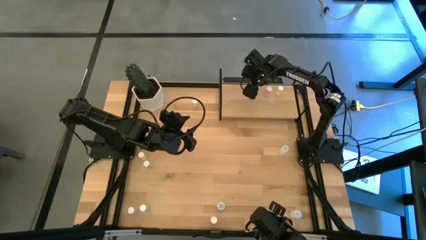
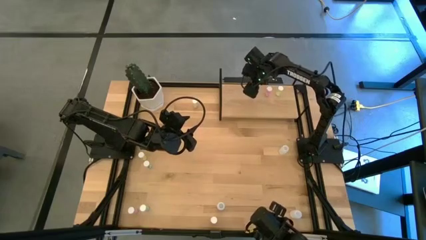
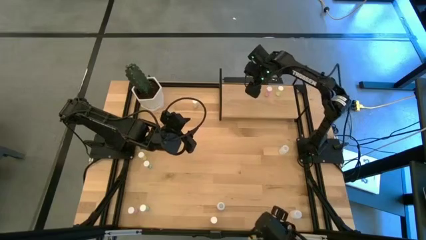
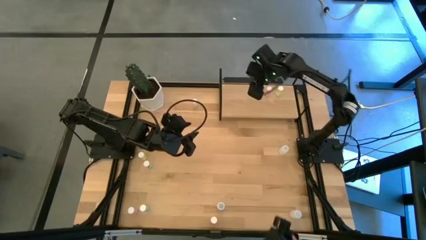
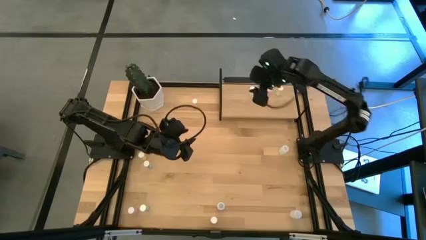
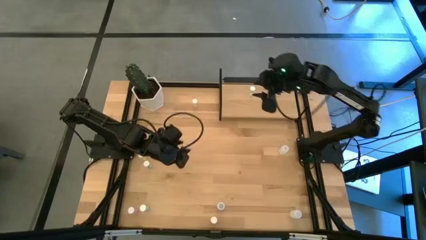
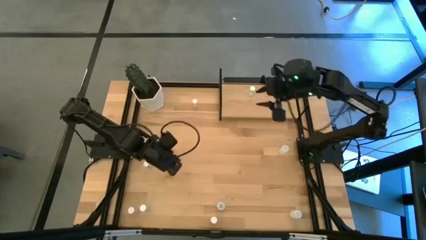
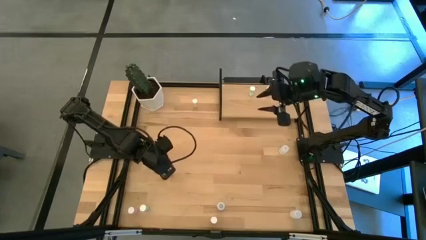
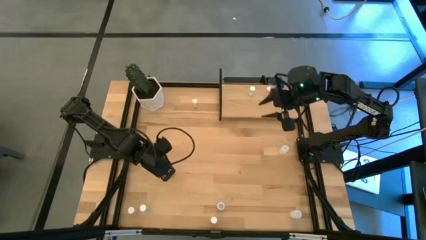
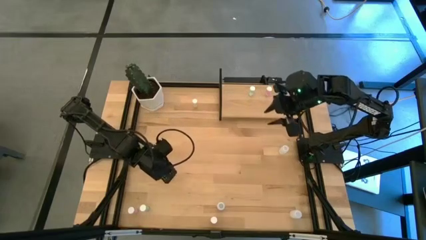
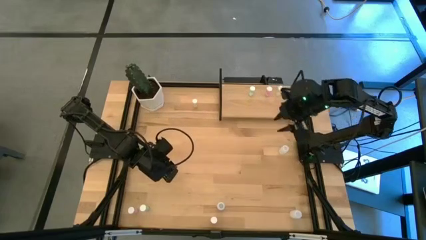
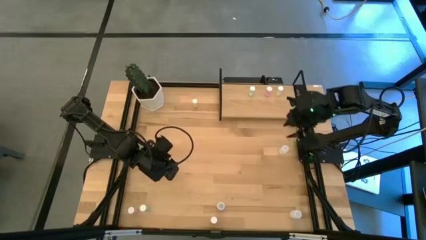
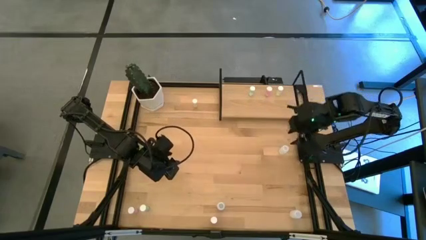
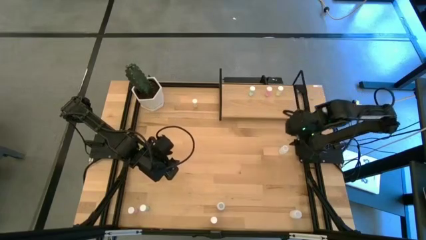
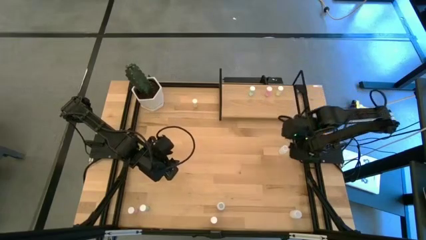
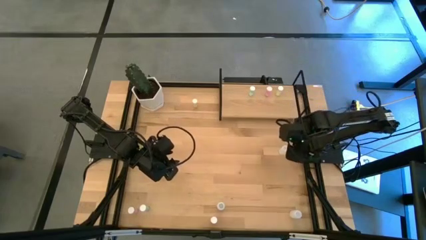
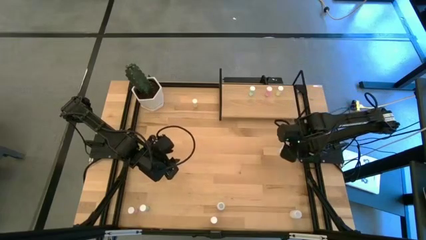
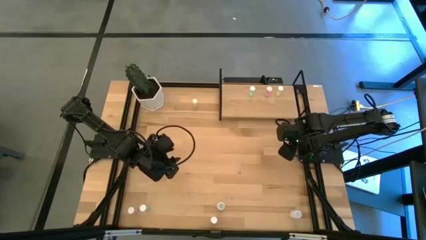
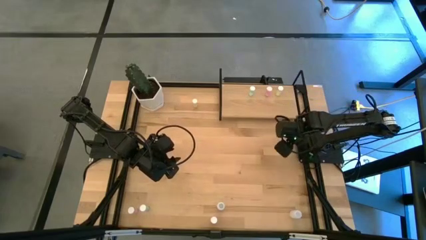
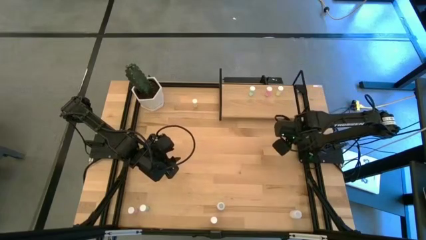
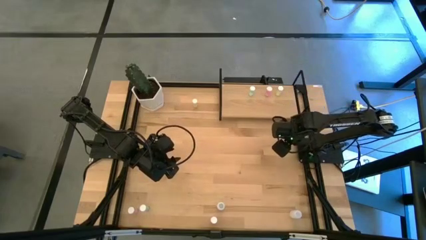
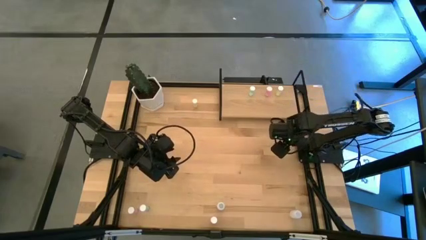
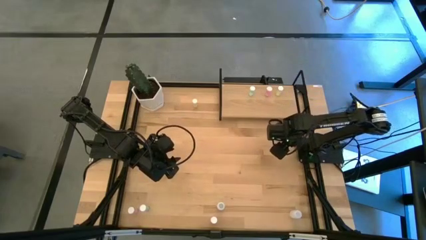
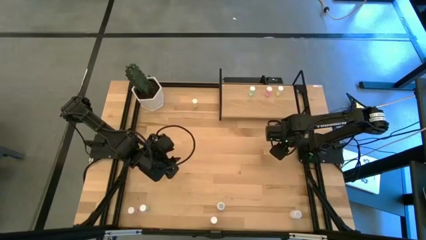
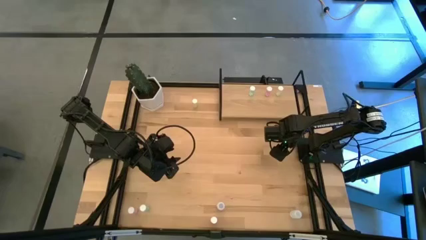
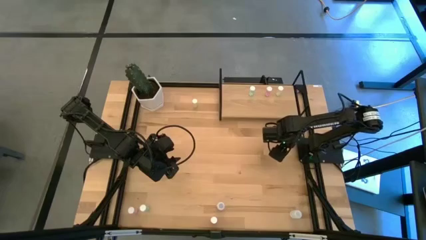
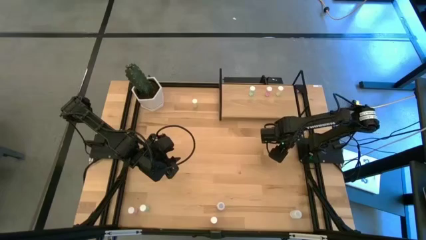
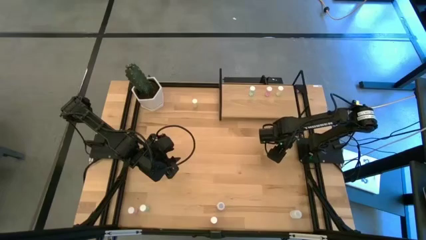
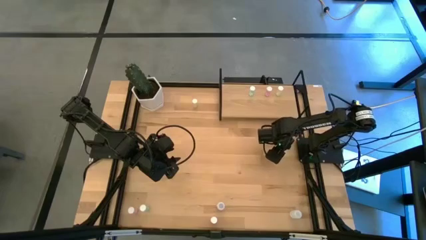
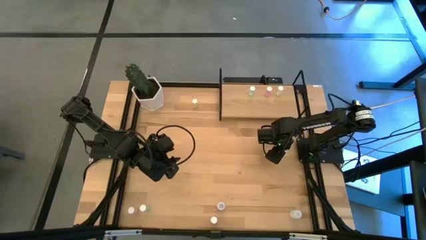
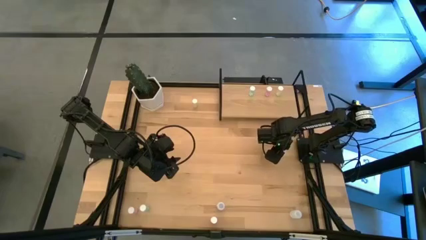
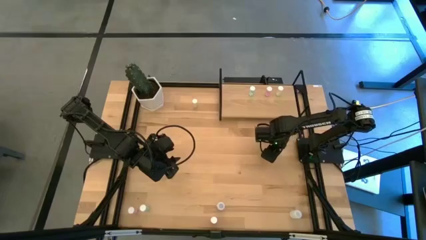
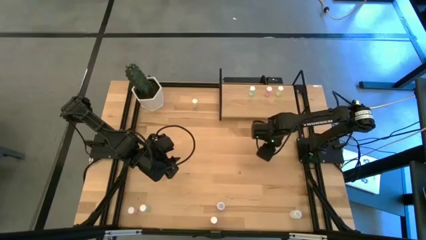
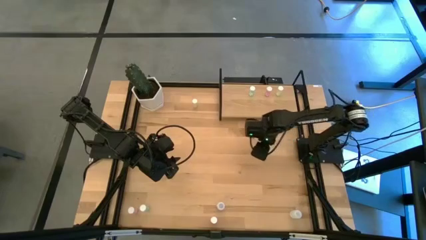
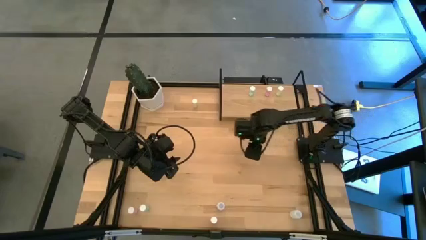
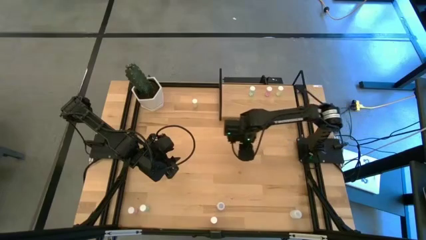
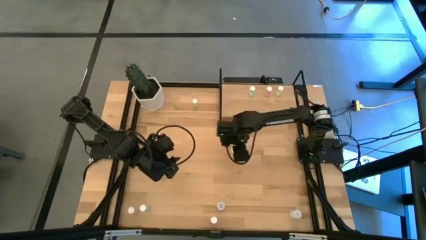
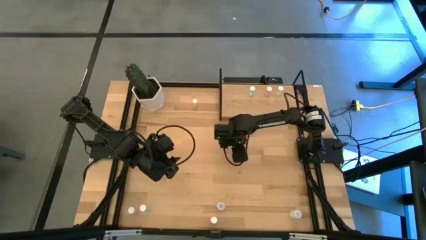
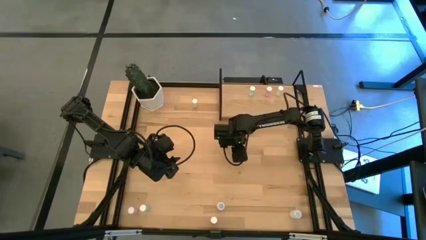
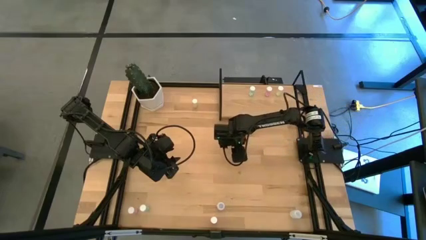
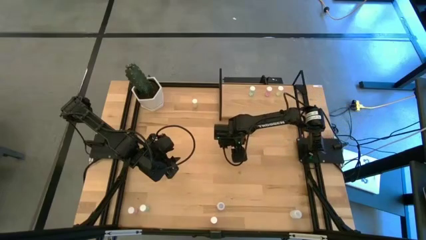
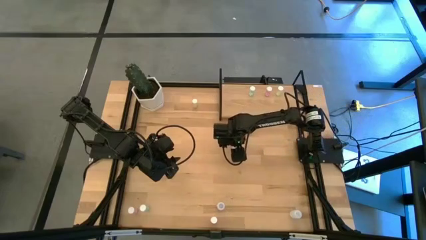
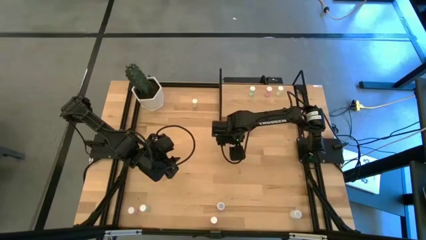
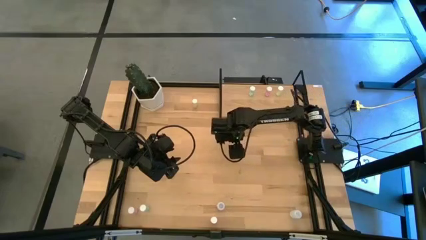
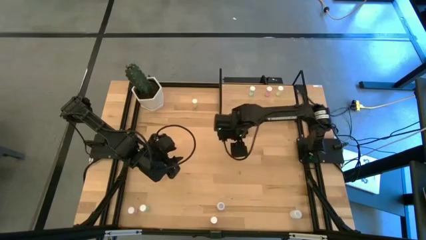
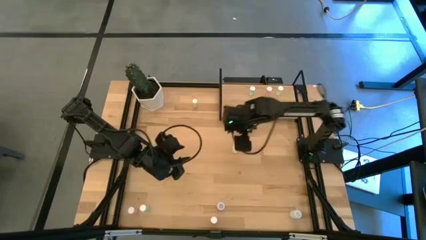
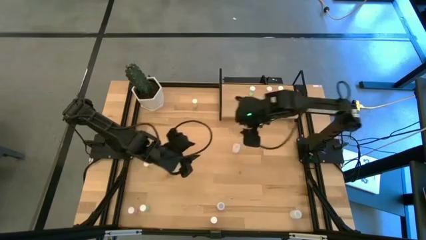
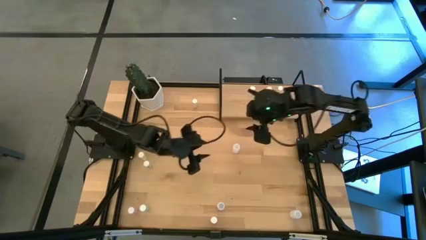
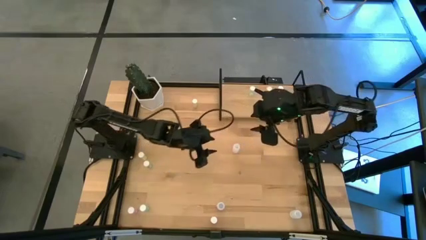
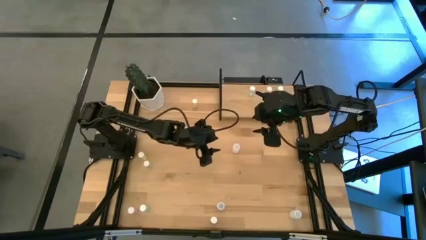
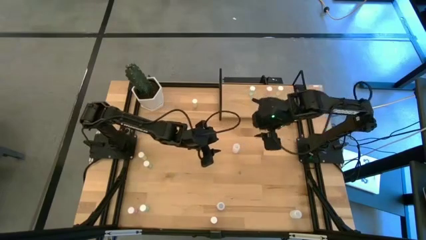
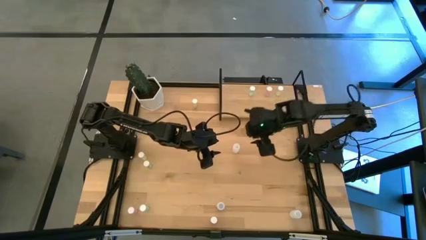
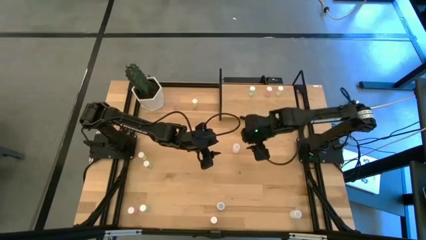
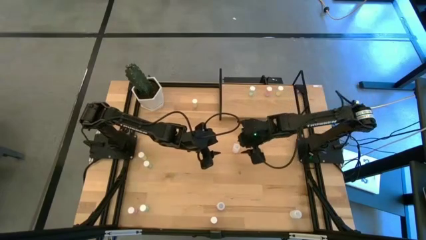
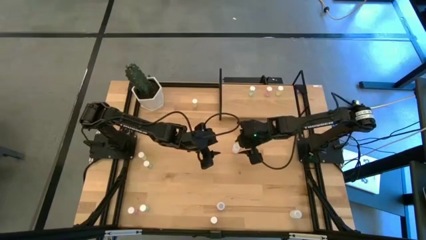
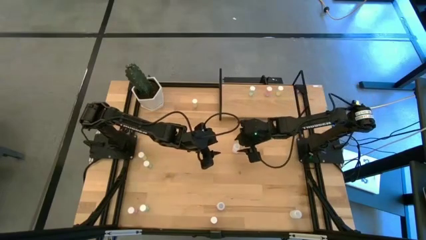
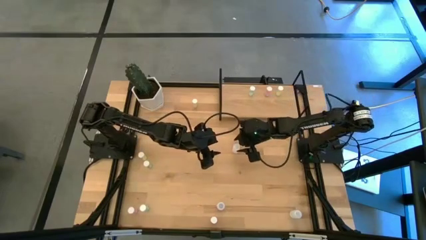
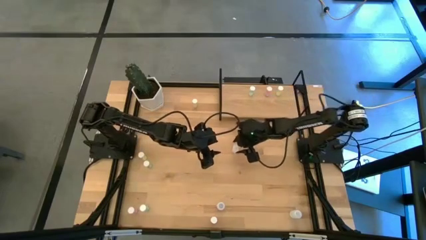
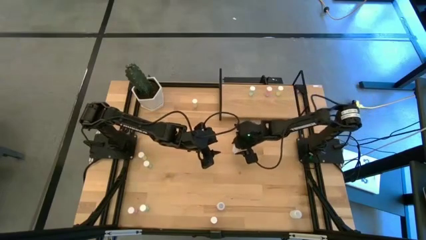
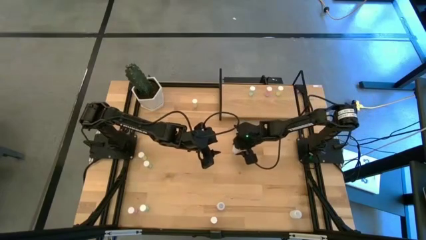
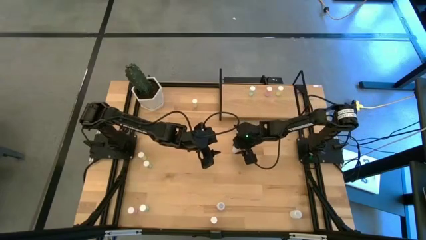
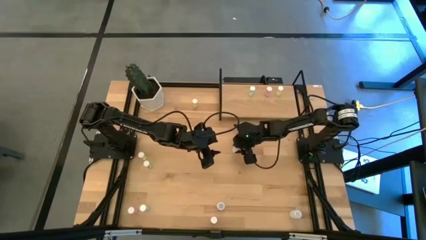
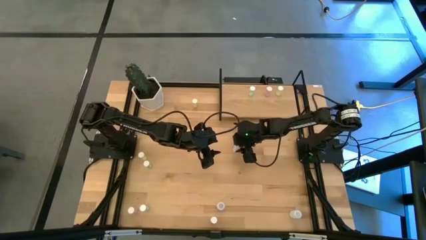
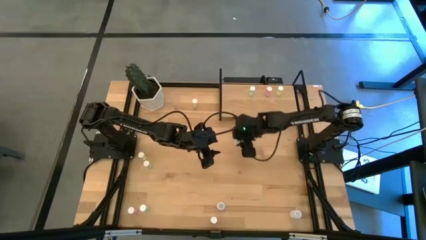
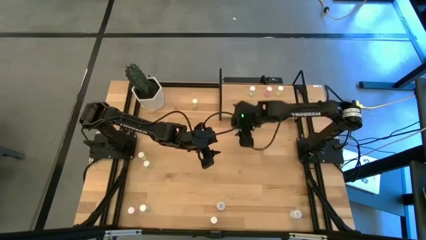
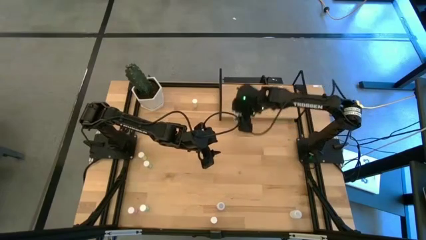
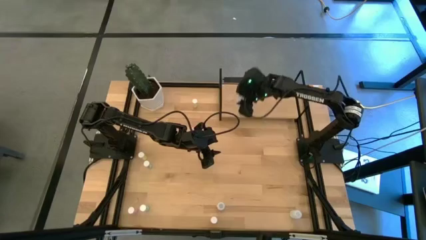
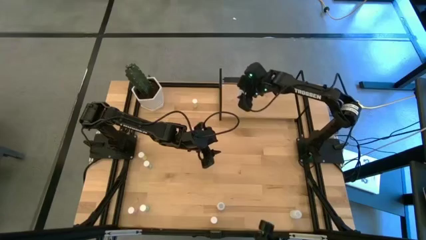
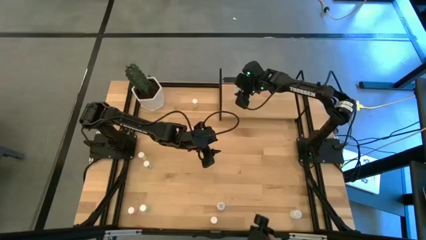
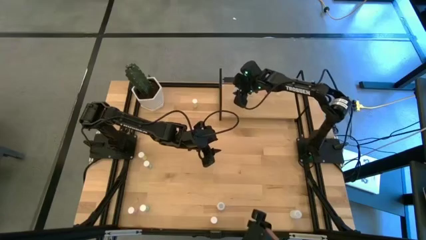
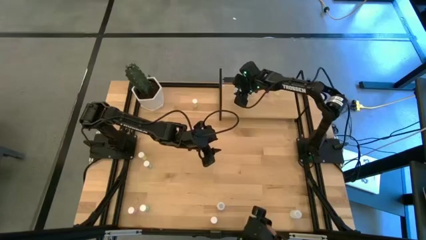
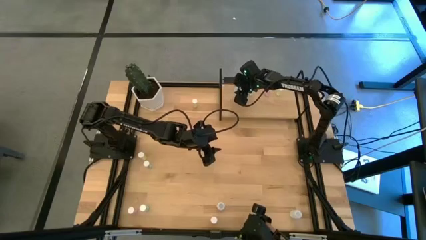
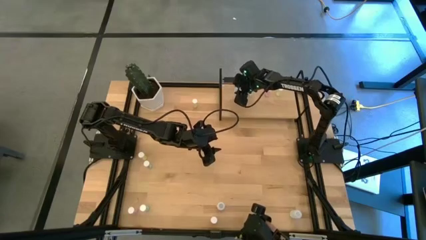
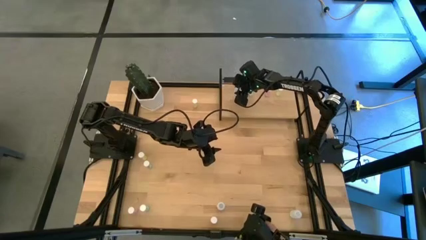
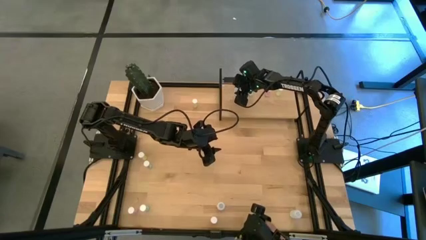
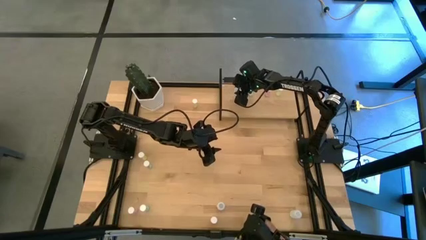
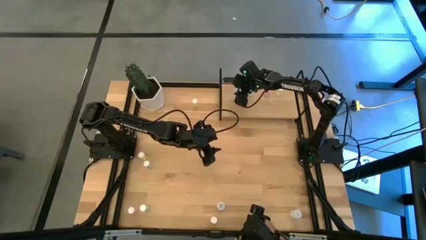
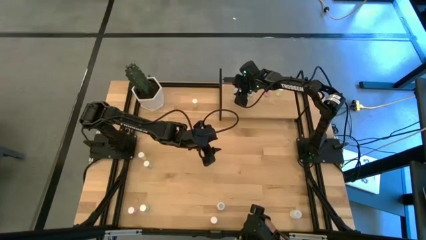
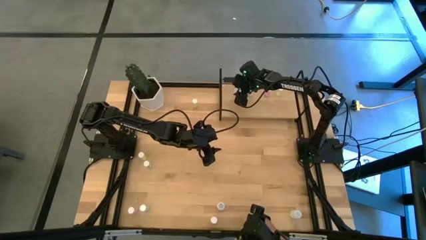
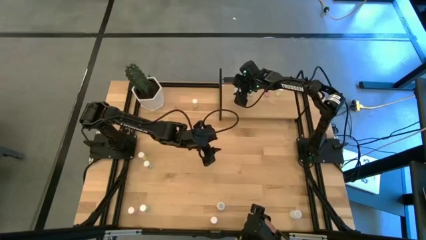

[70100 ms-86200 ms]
Task: Pick and place medicine bottles onto shelf by color
Put the top transparent pill bottle on the shelf
